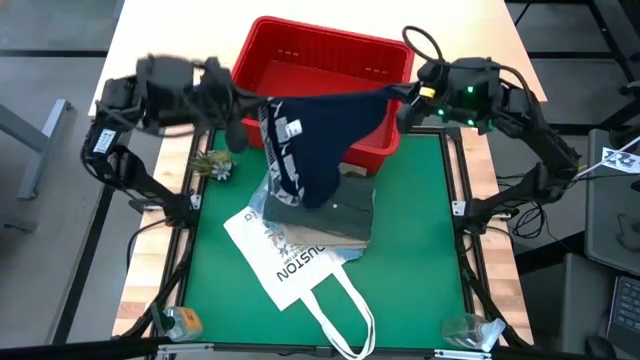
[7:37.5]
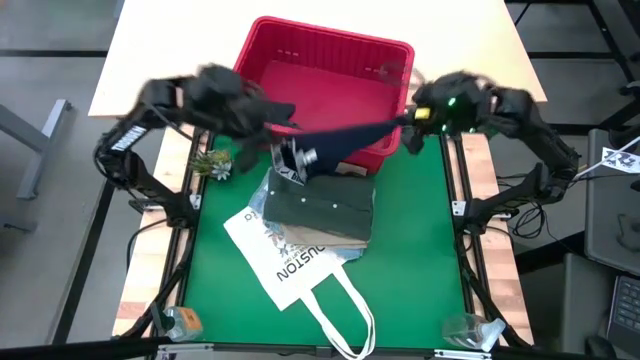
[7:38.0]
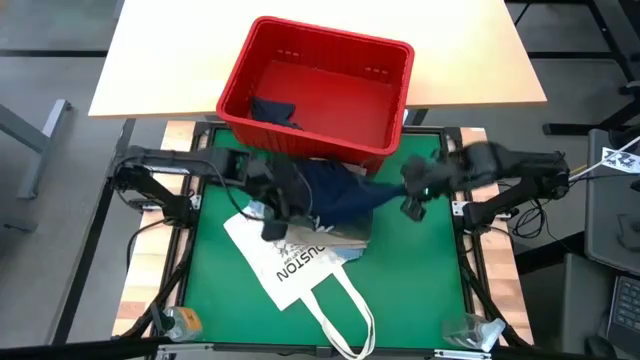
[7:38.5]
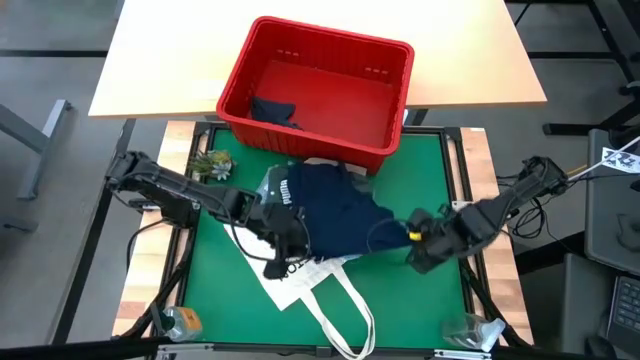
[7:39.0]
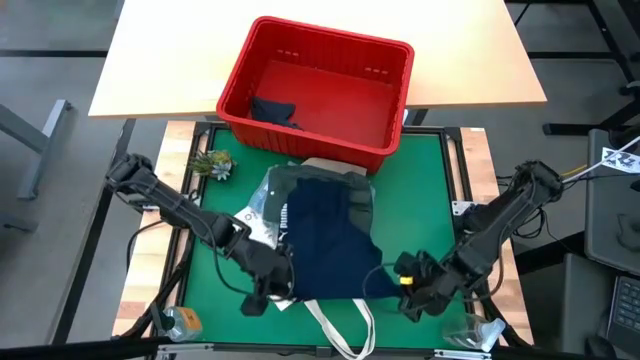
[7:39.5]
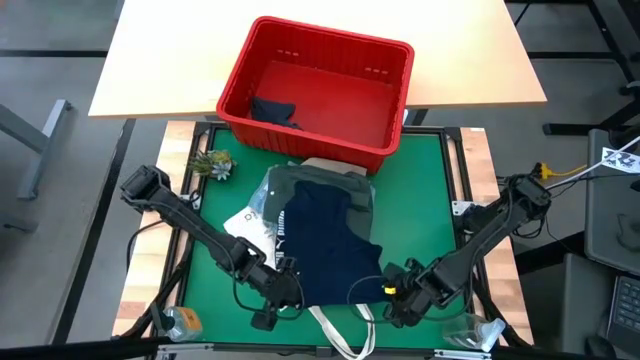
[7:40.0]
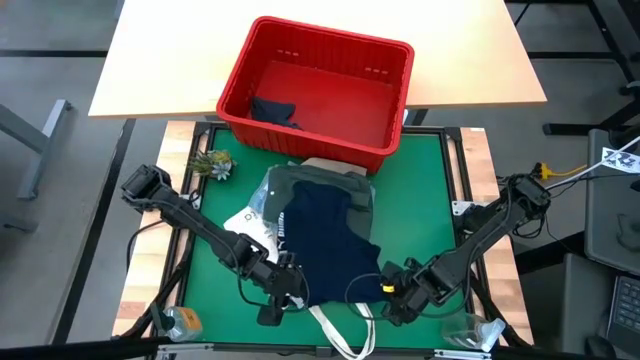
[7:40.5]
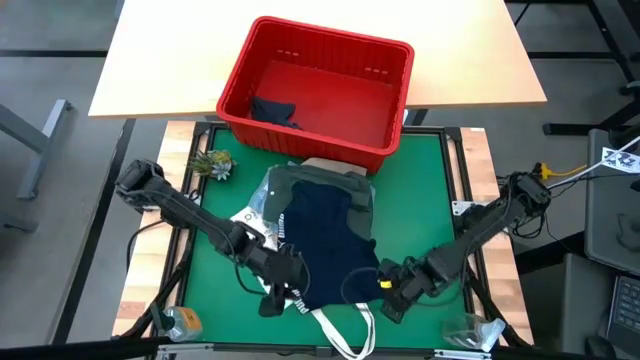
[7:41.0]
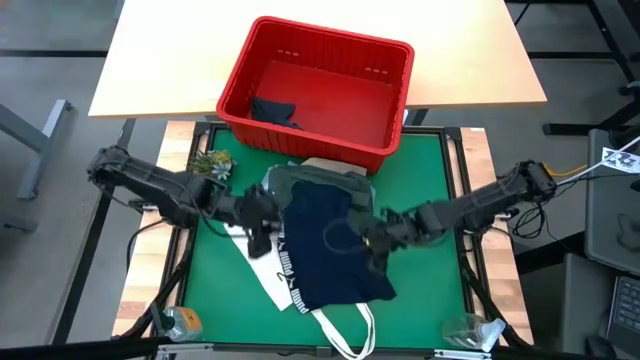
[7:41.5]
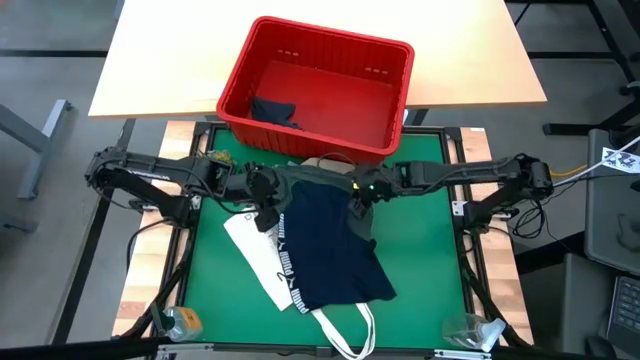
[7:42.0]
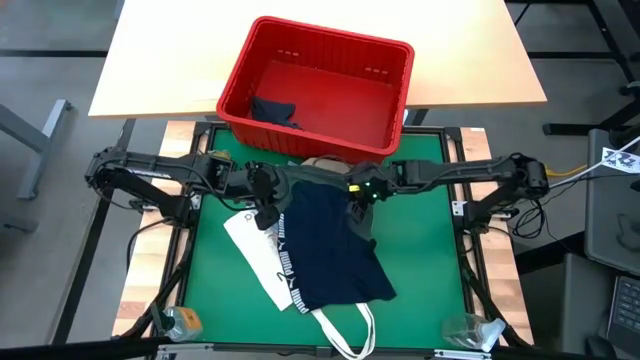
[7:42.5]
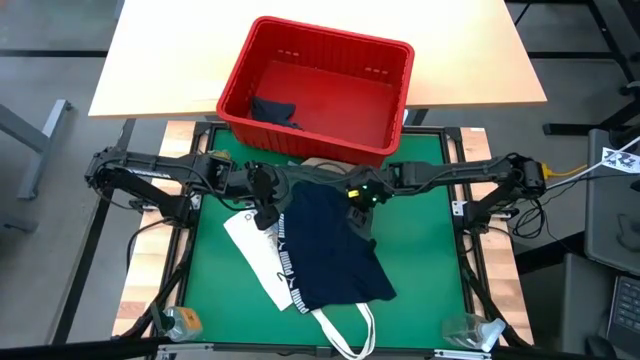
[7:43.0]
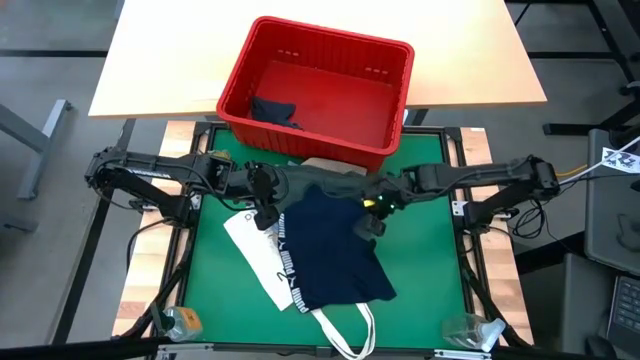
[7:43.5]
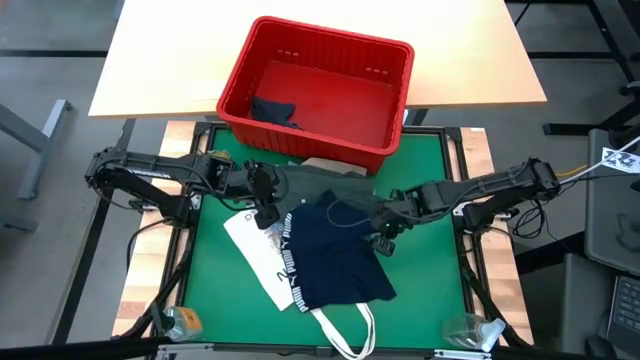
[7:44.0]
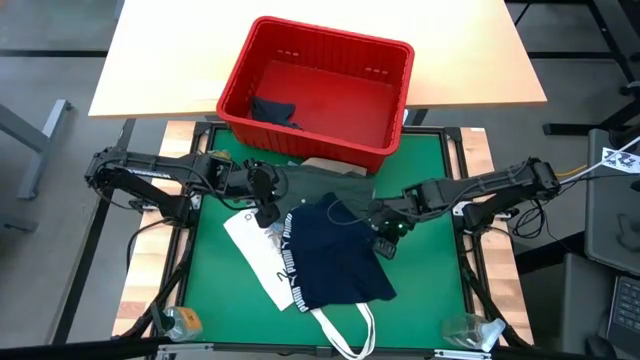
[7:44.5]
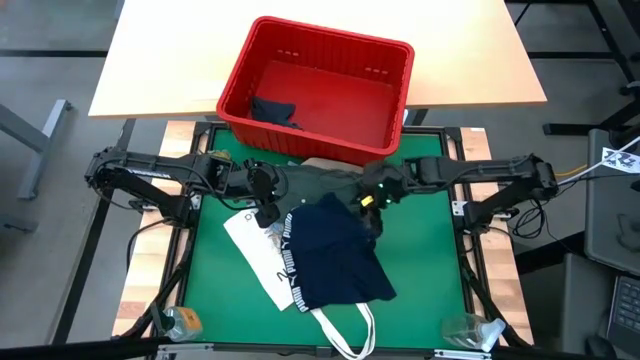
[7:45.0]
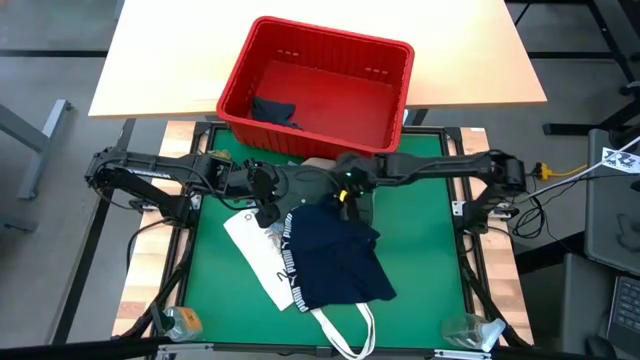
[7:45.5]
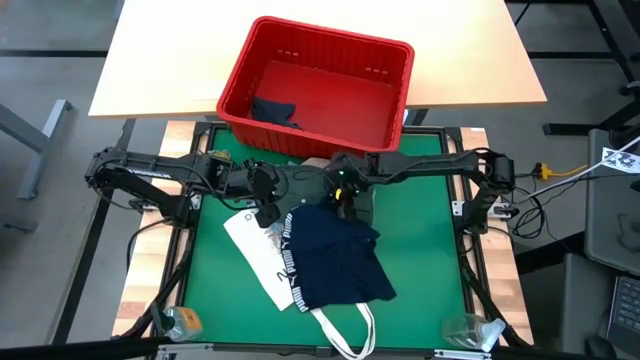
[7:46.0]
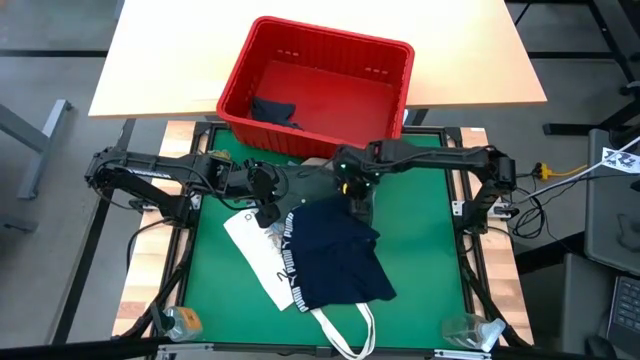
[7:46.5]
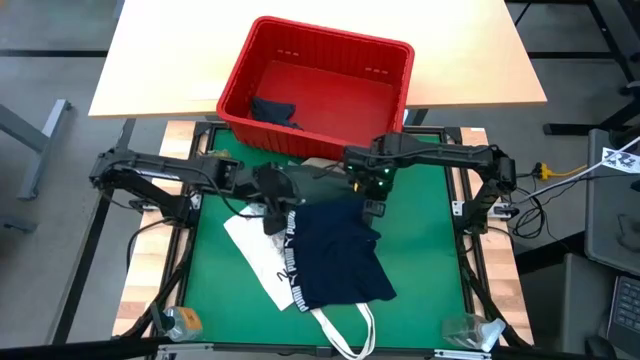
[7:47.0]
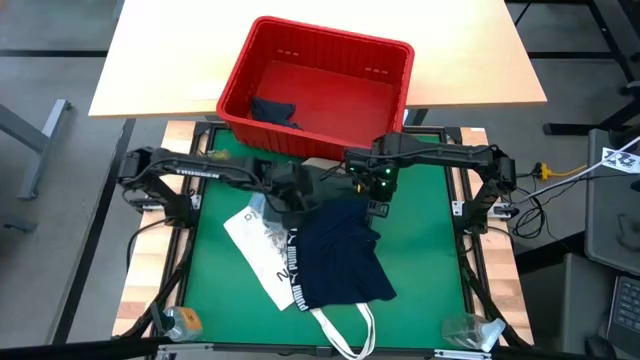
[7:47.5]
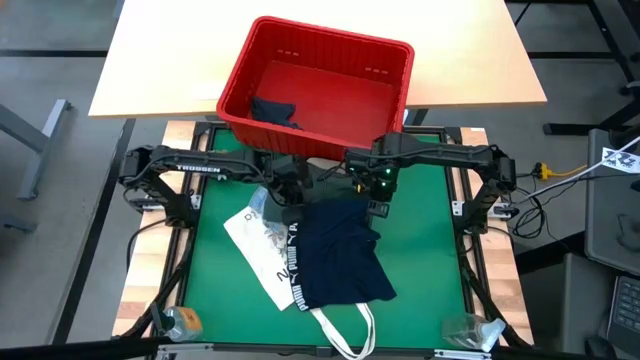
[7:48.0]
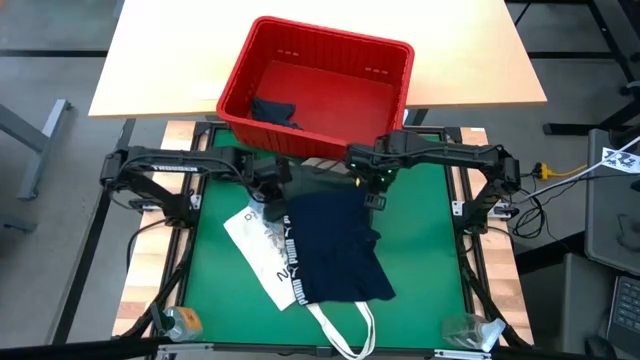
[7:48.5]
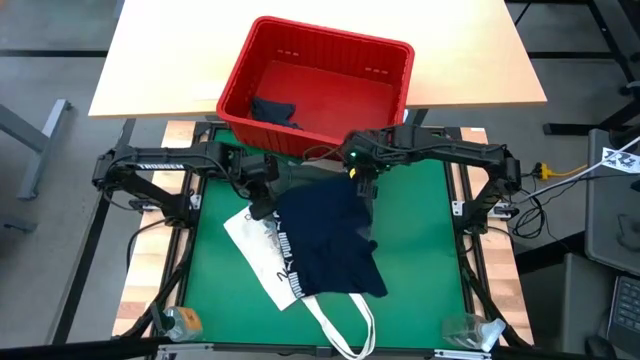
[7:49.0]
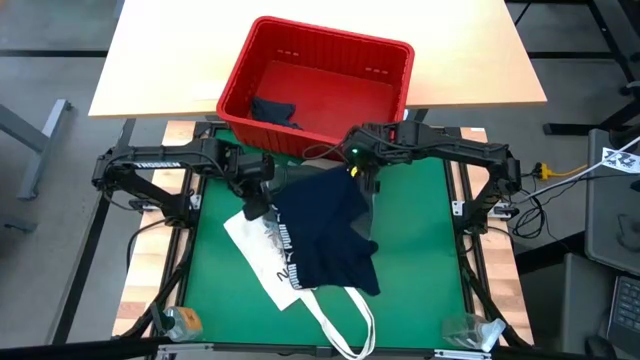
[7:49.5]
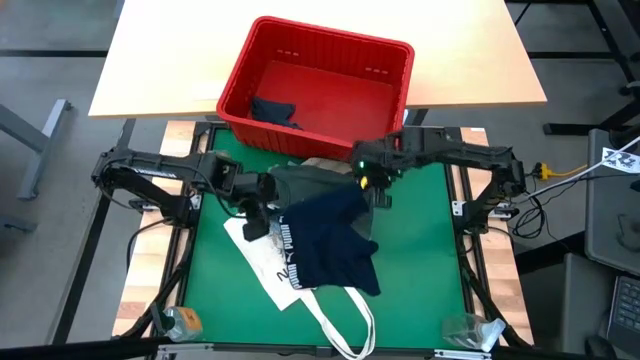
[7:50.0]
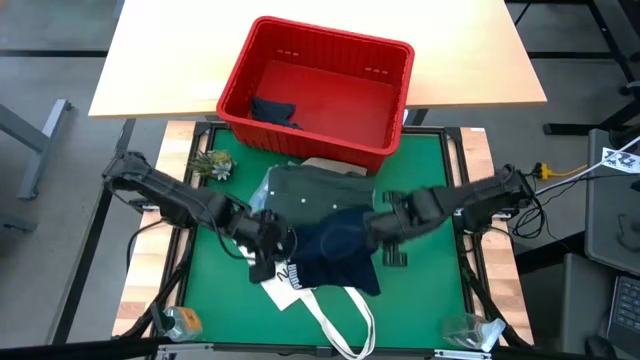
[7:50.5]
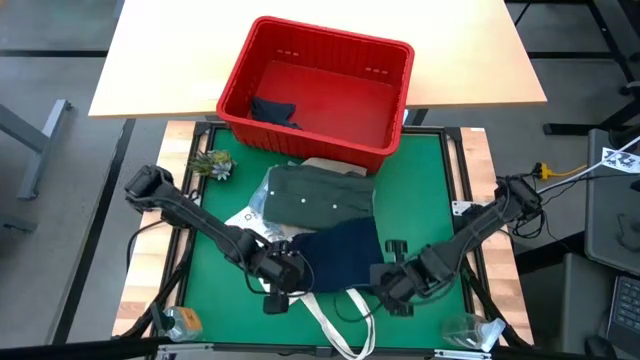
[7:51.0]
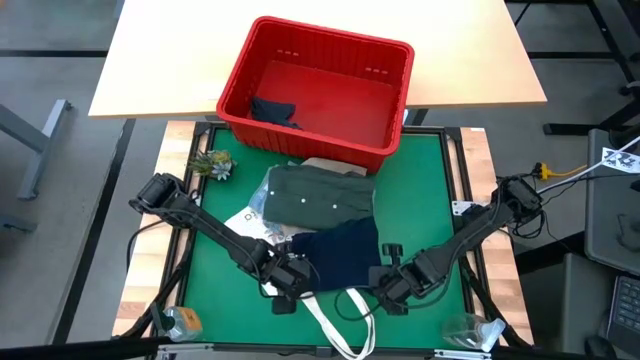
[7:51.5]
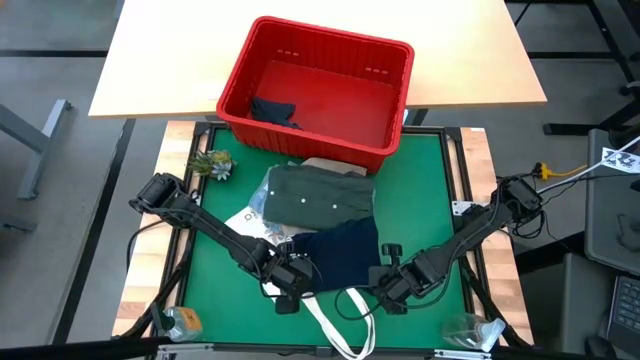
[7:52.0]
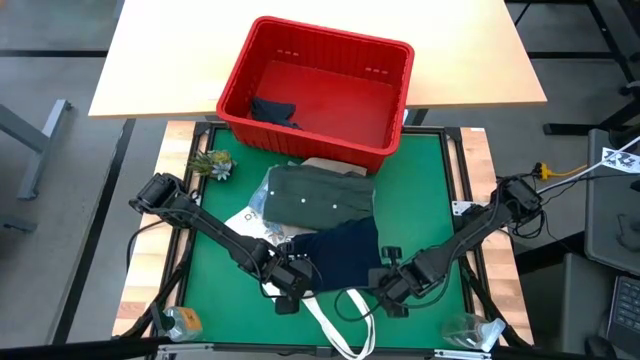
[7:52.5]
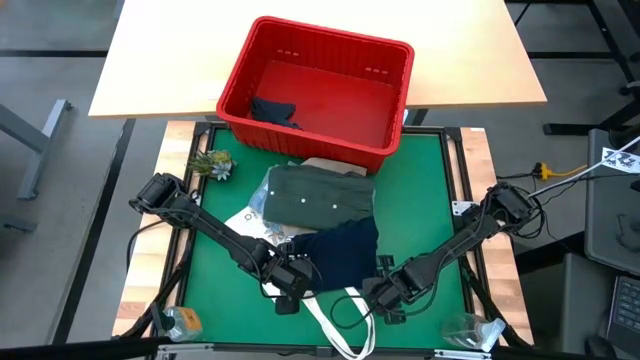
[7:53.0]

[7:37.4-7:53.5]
Task: Fold Laundry from Bin
Fold the dark blue boxers
